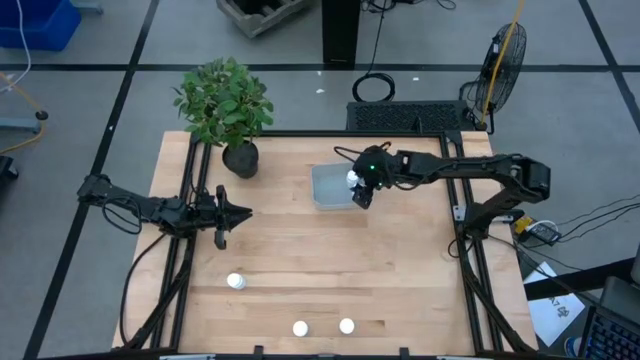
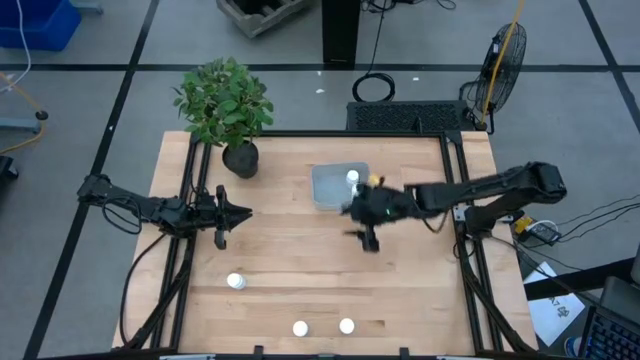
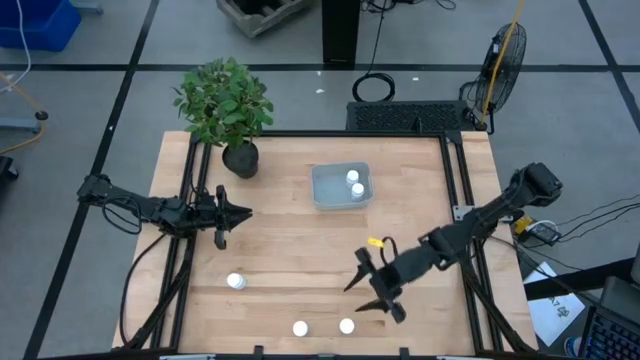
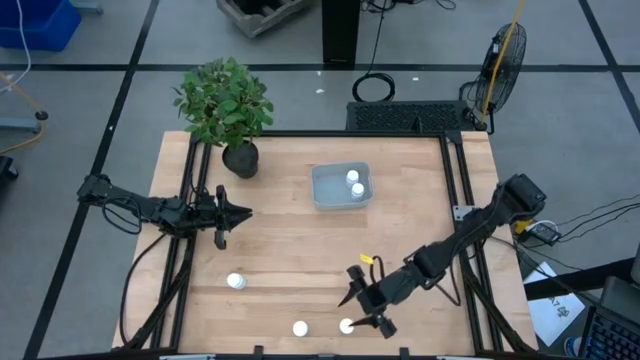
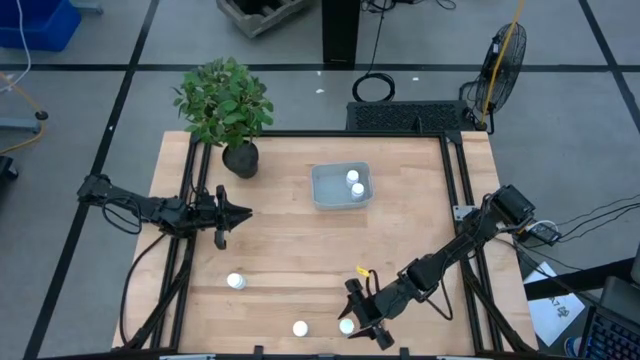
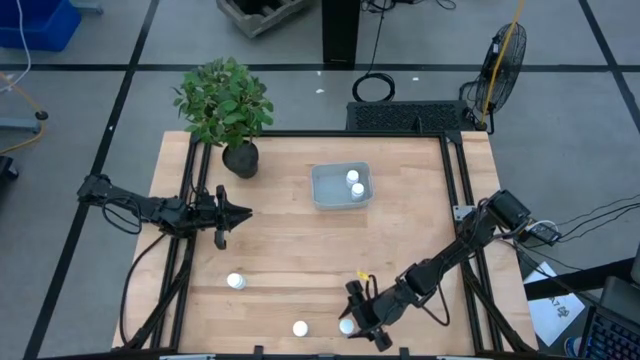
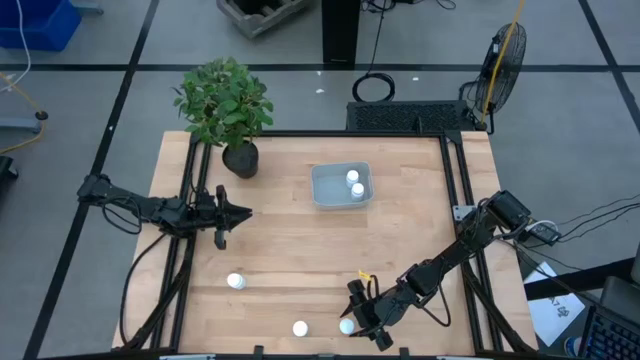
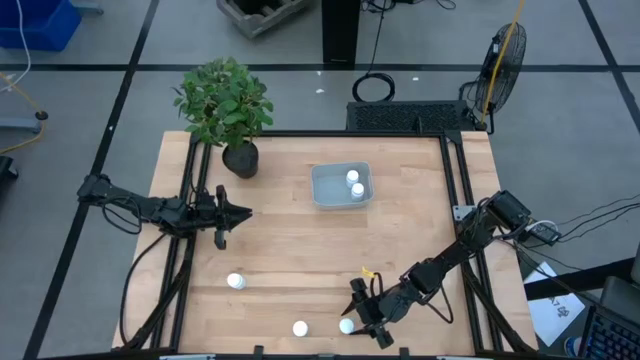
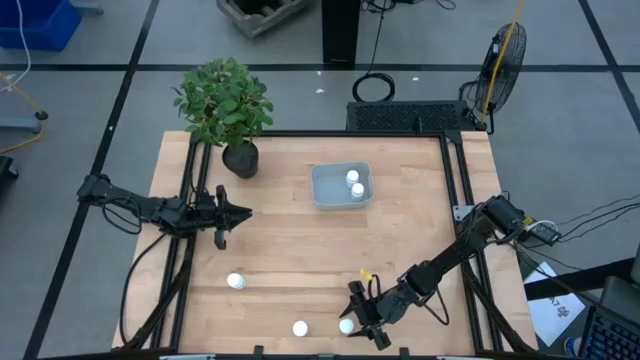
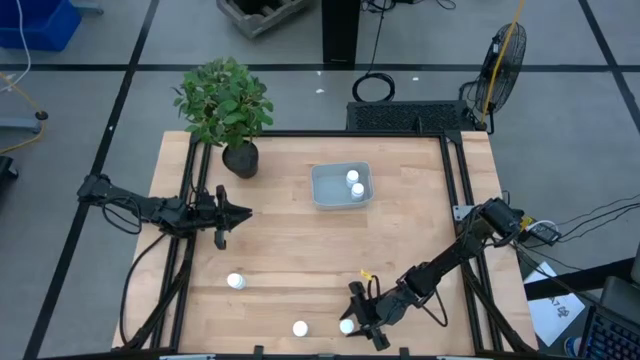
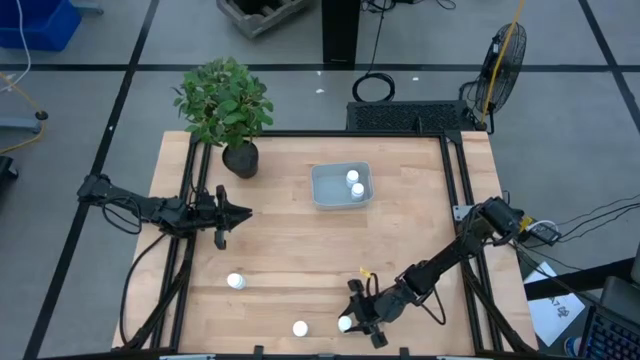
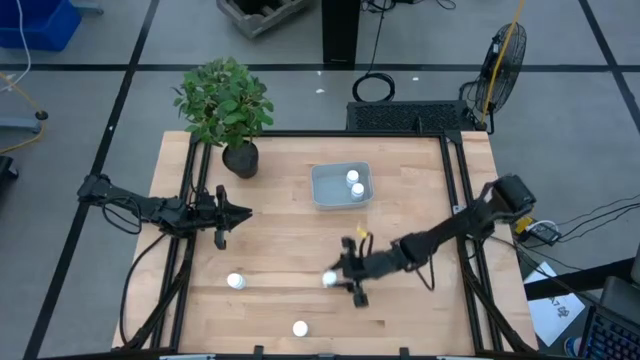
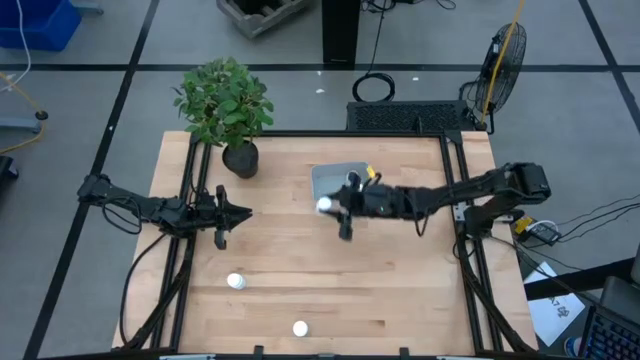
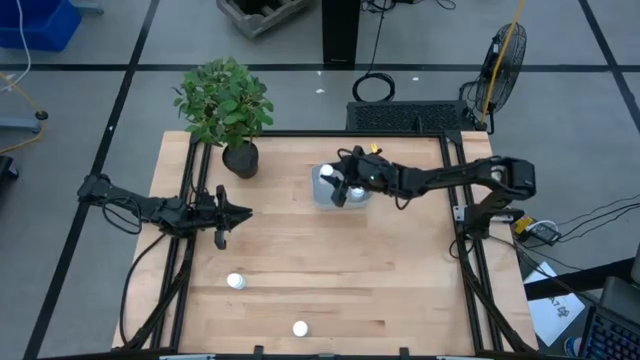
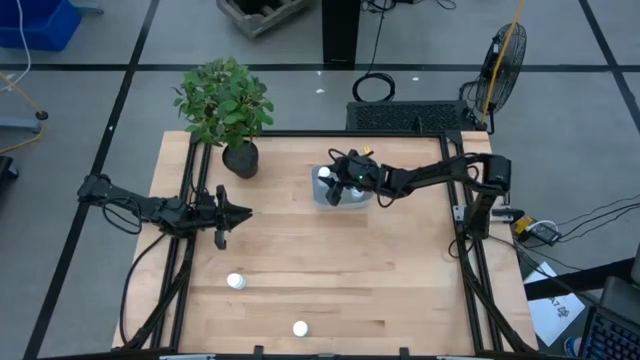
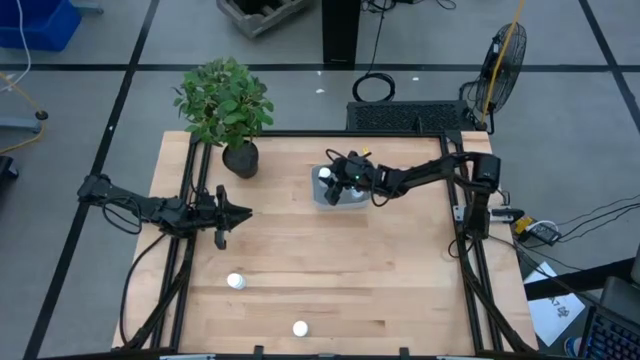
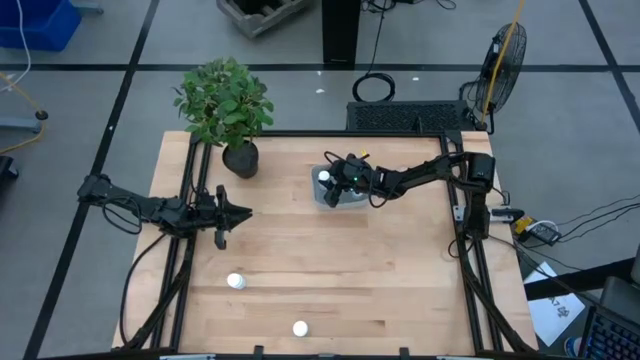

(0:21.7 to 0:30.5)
Task: Pick and place pill bottles into a basket
Put the white pill bottle into the white bin

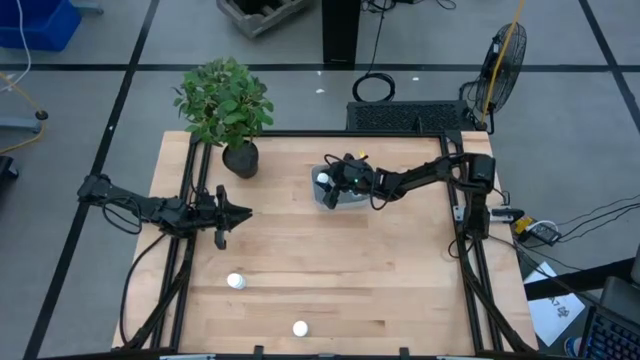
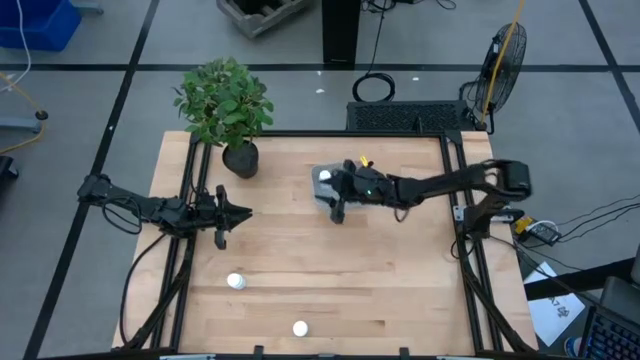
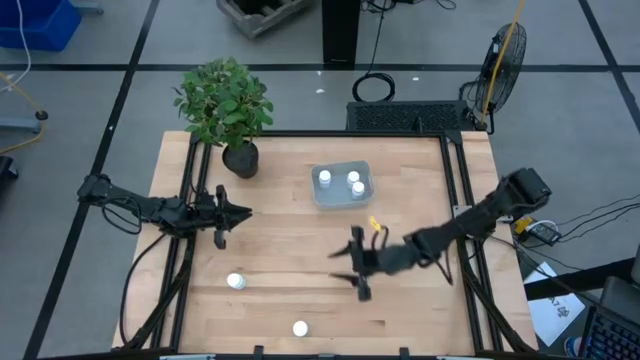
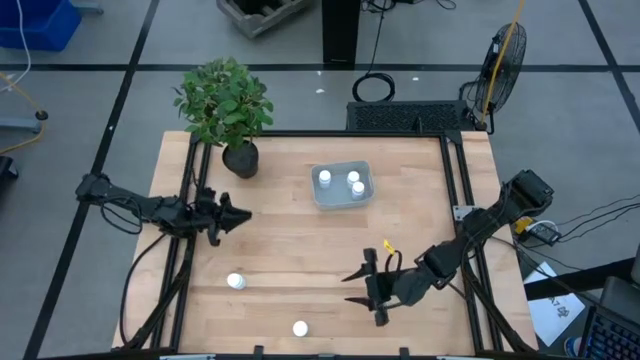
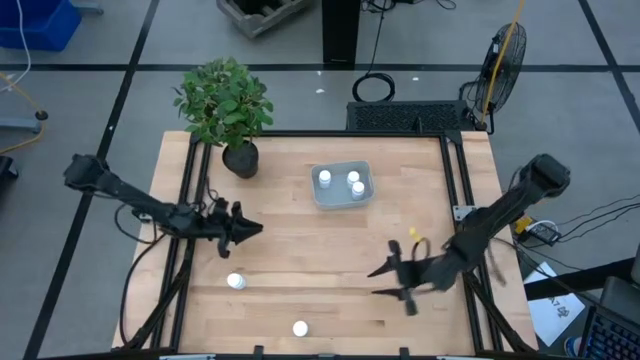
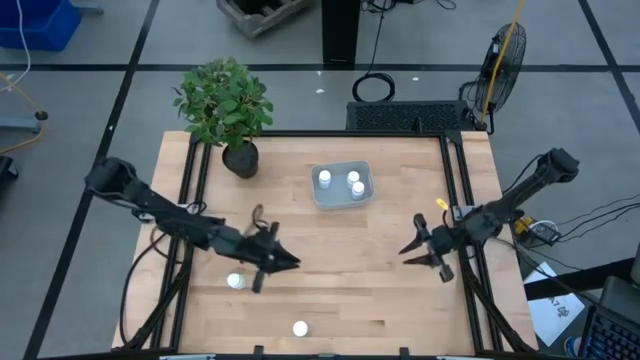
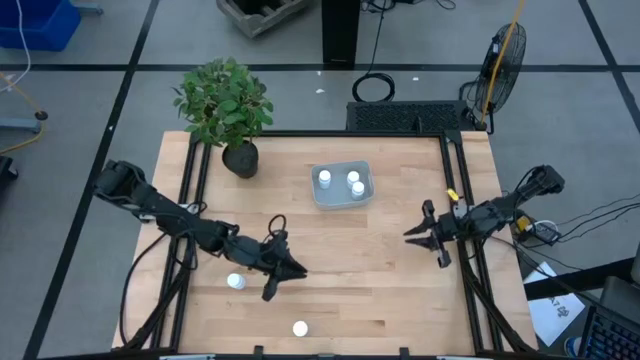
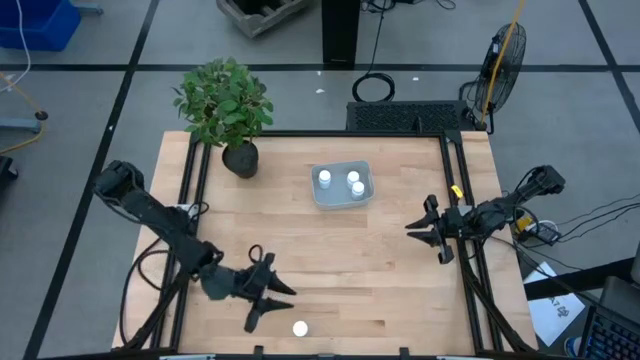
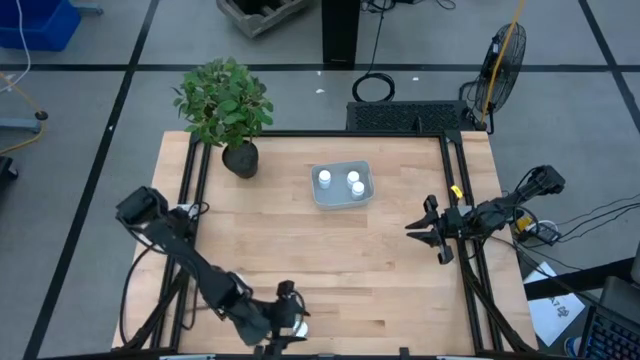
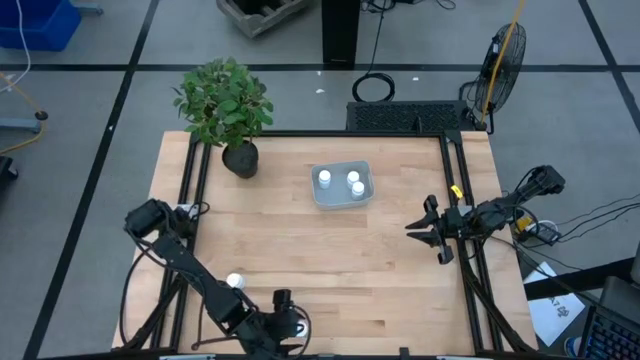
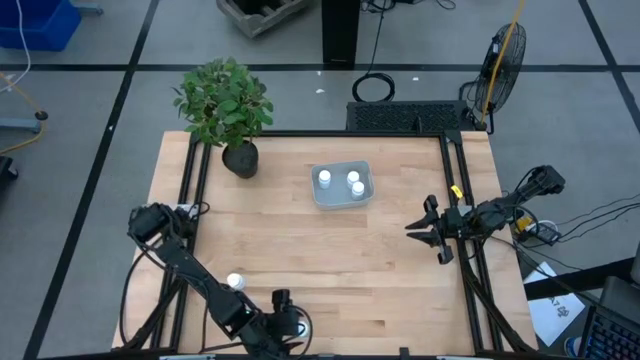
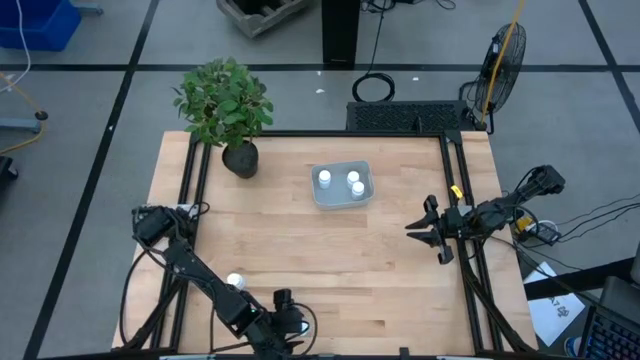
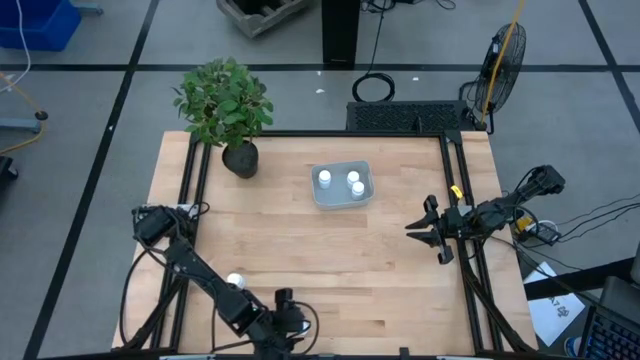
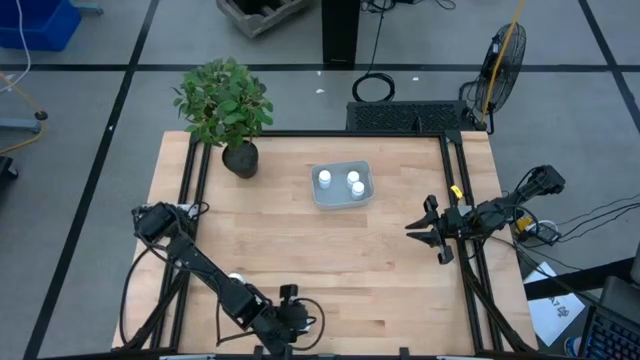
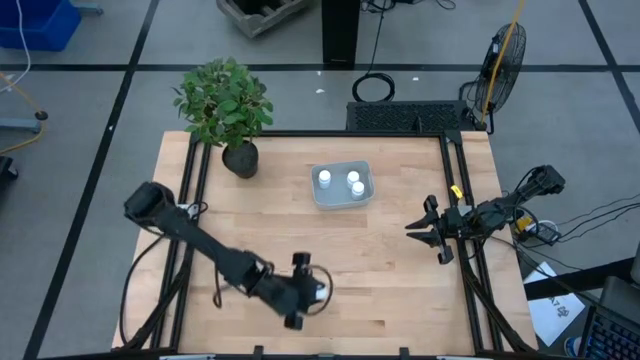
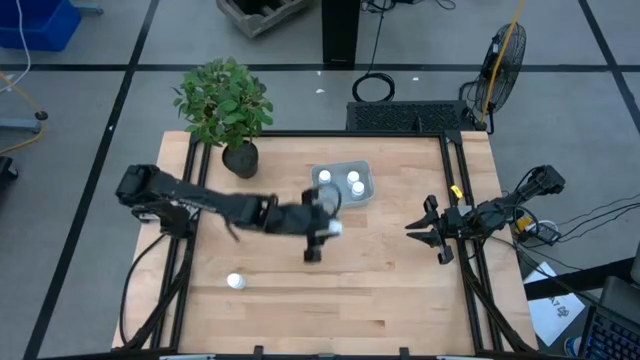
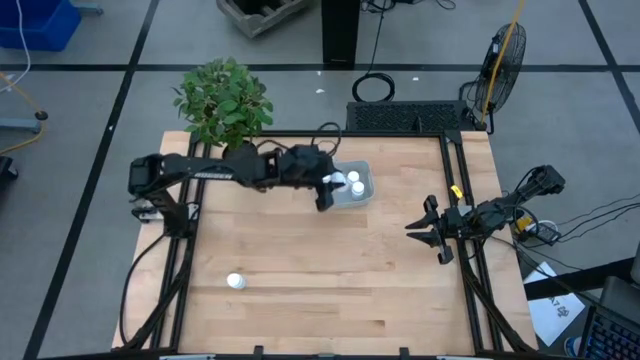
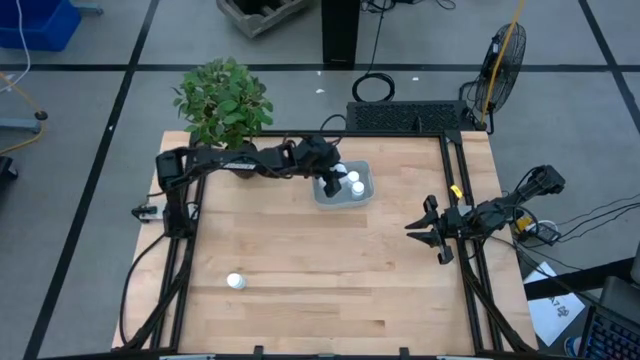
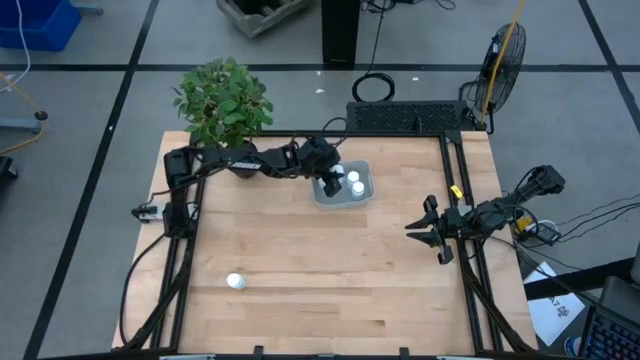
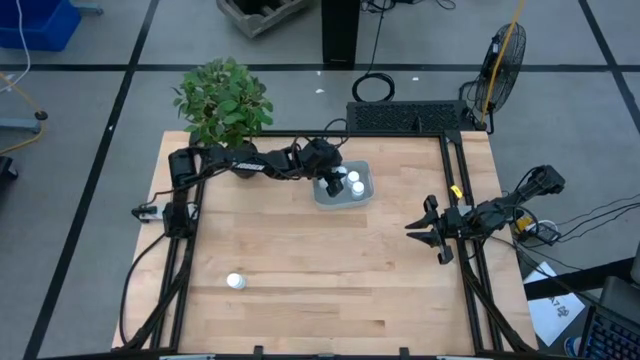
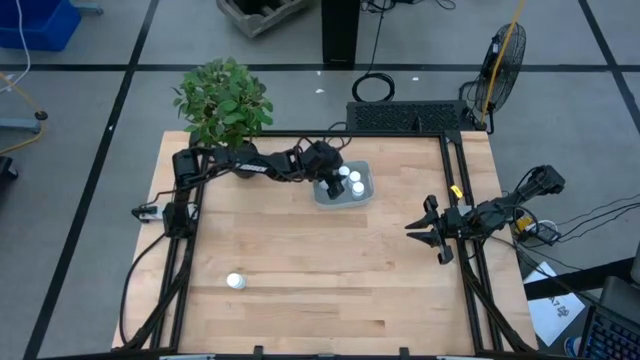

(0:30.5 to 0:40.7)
Put the white pill bottle into the white bin
